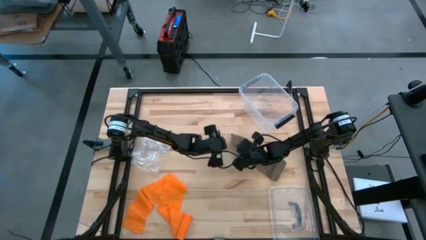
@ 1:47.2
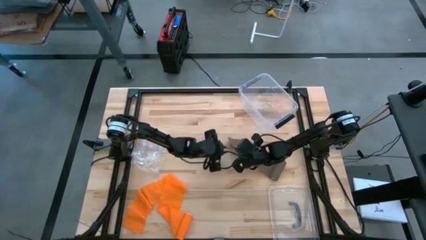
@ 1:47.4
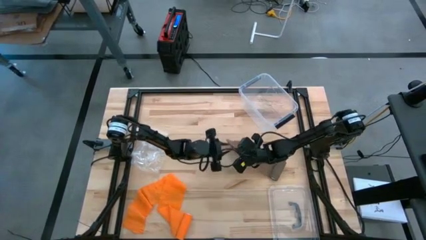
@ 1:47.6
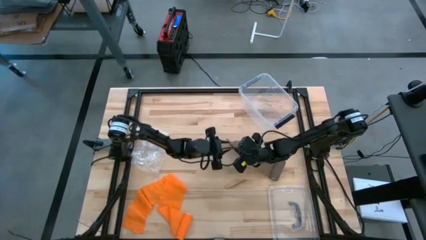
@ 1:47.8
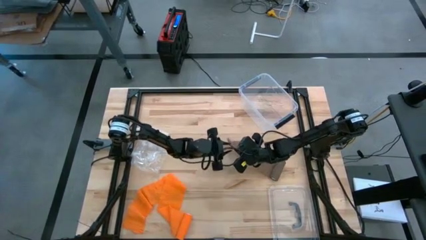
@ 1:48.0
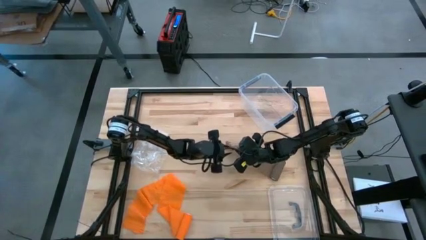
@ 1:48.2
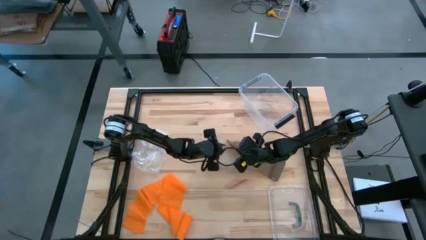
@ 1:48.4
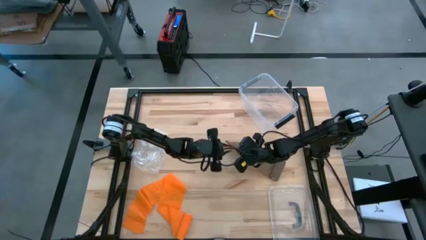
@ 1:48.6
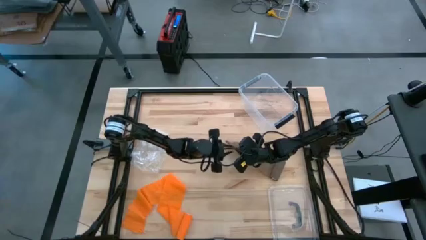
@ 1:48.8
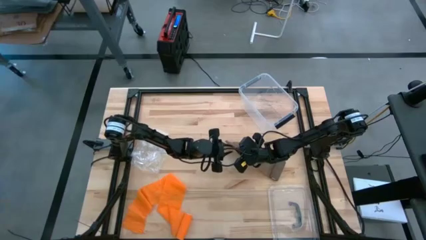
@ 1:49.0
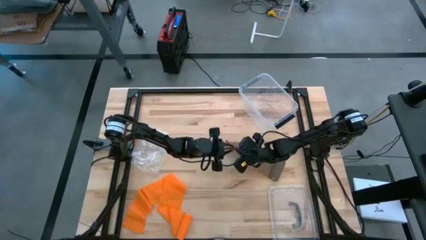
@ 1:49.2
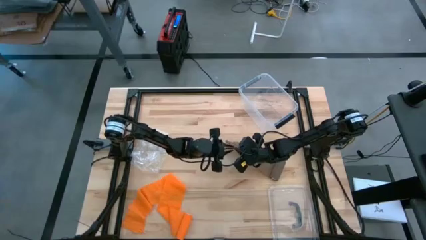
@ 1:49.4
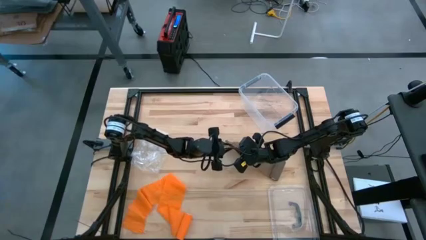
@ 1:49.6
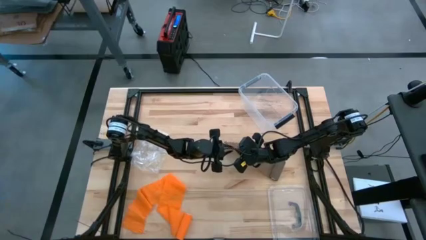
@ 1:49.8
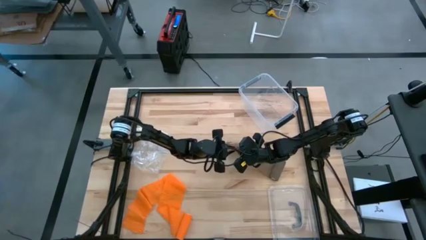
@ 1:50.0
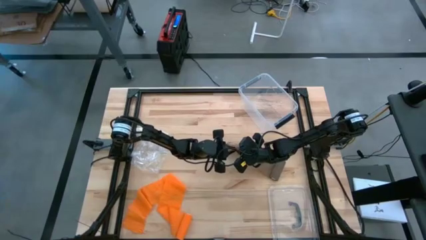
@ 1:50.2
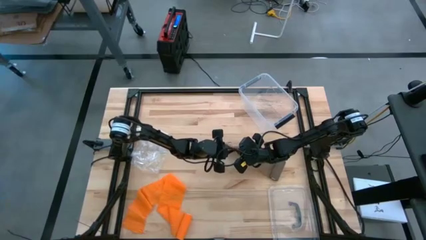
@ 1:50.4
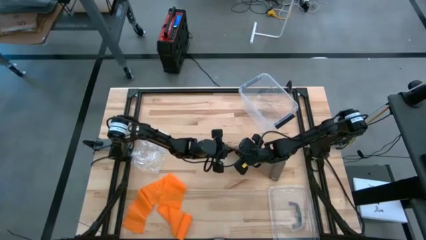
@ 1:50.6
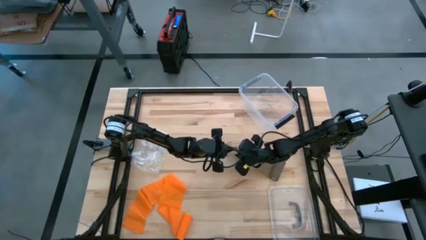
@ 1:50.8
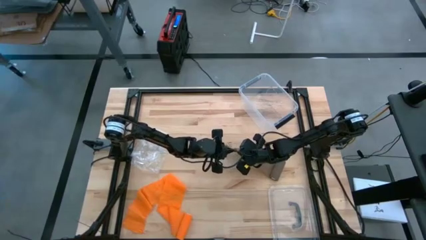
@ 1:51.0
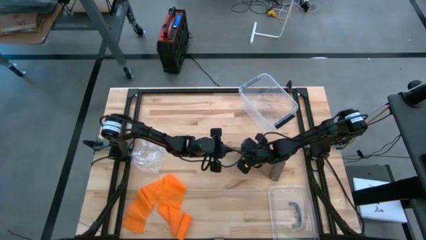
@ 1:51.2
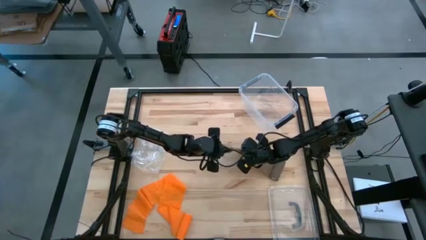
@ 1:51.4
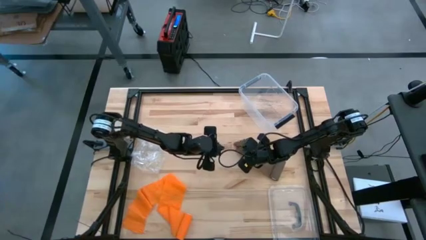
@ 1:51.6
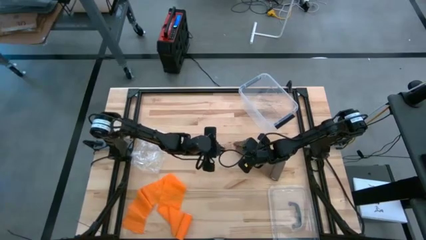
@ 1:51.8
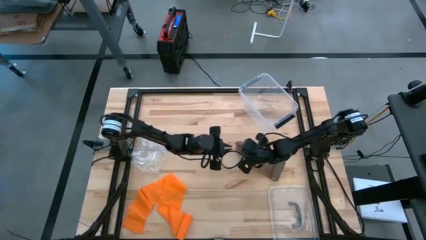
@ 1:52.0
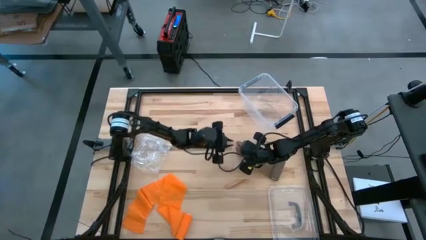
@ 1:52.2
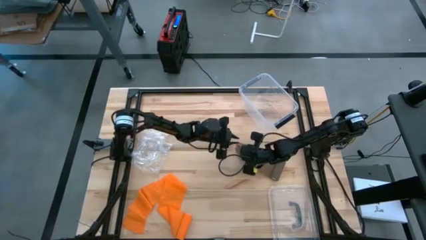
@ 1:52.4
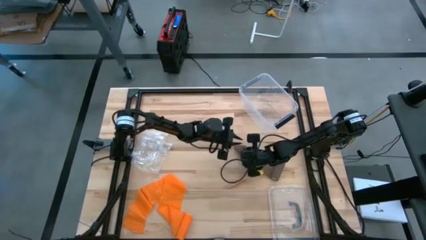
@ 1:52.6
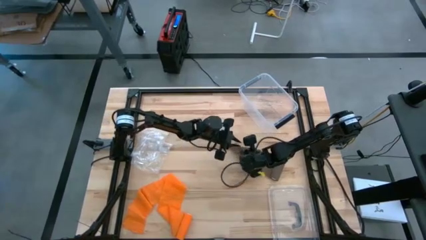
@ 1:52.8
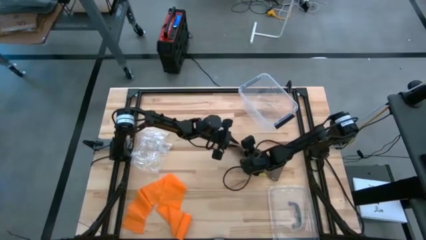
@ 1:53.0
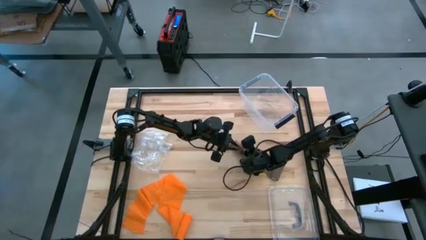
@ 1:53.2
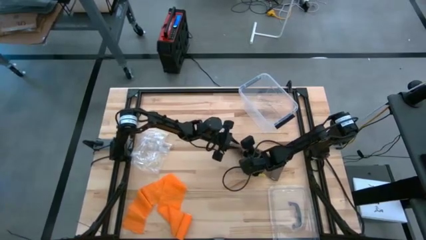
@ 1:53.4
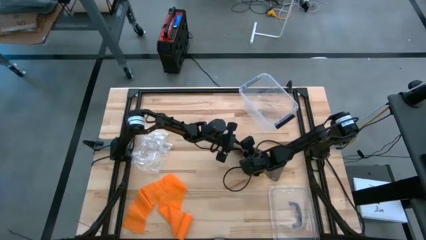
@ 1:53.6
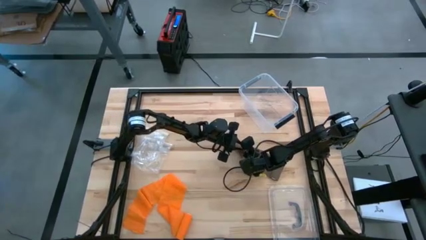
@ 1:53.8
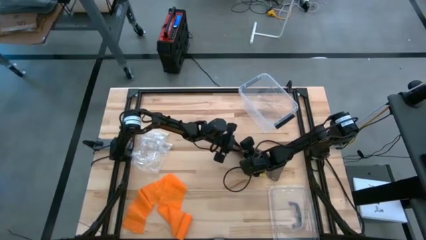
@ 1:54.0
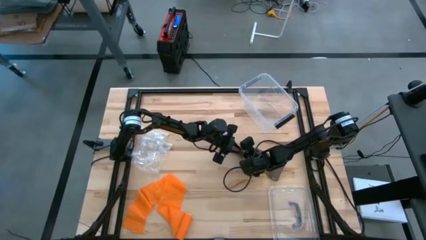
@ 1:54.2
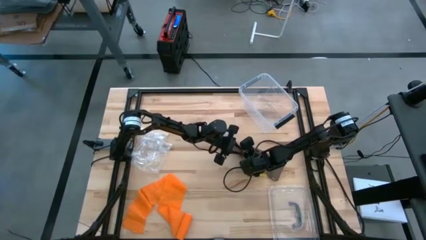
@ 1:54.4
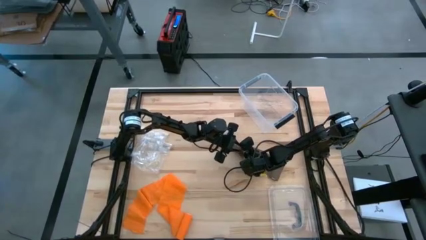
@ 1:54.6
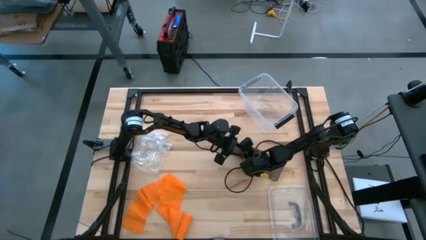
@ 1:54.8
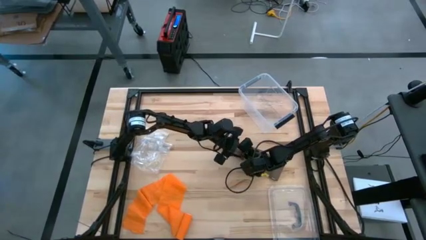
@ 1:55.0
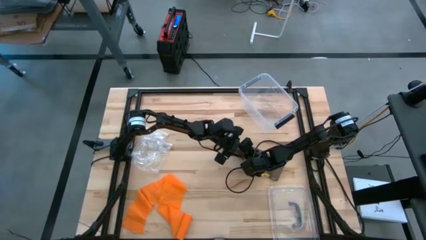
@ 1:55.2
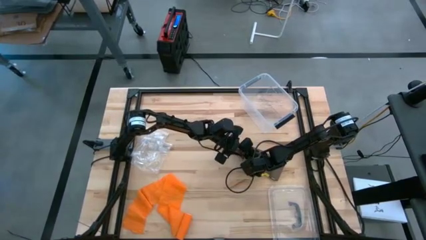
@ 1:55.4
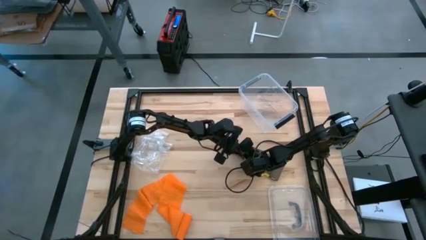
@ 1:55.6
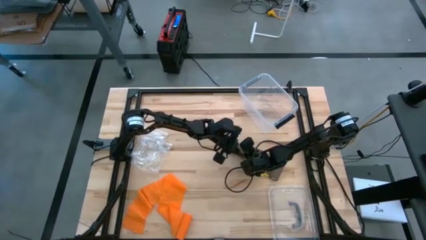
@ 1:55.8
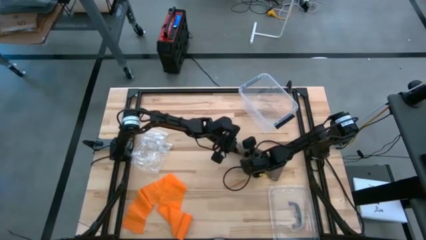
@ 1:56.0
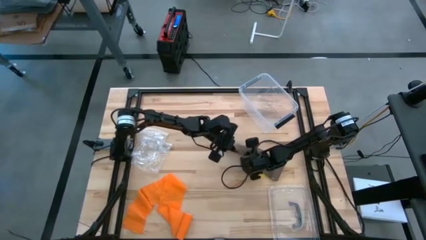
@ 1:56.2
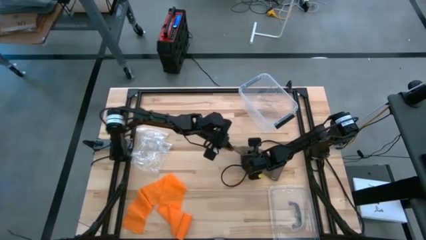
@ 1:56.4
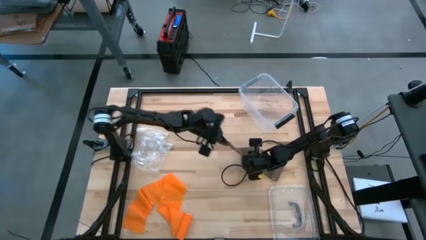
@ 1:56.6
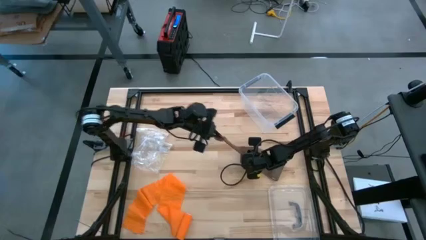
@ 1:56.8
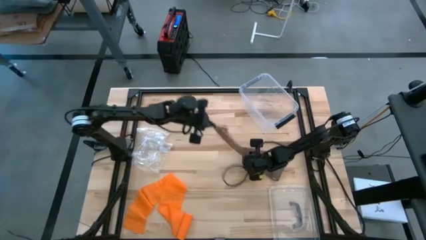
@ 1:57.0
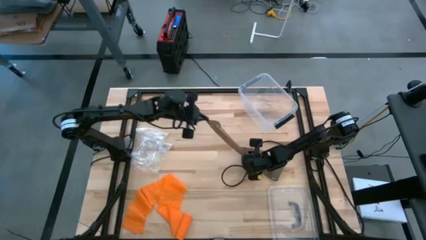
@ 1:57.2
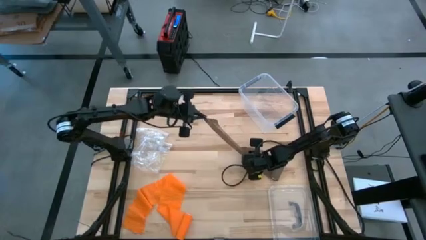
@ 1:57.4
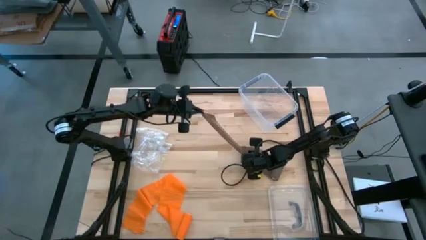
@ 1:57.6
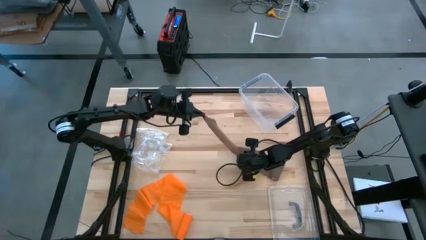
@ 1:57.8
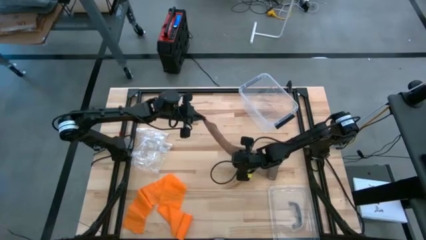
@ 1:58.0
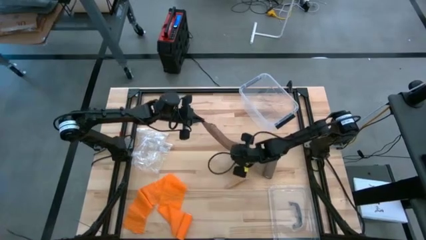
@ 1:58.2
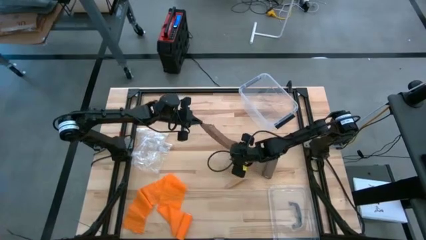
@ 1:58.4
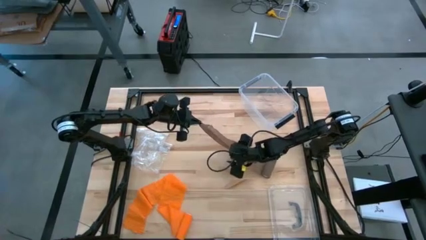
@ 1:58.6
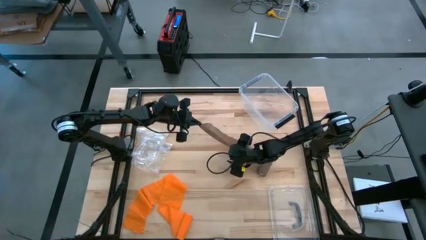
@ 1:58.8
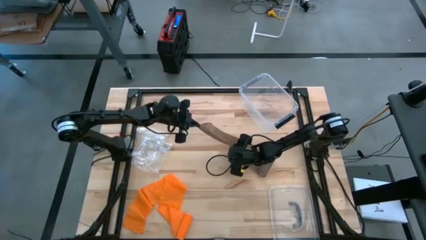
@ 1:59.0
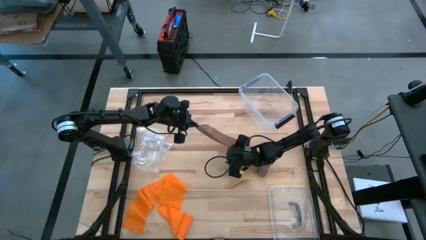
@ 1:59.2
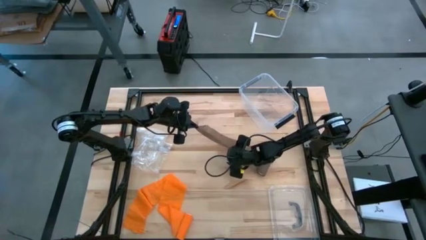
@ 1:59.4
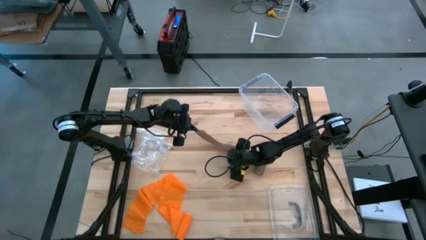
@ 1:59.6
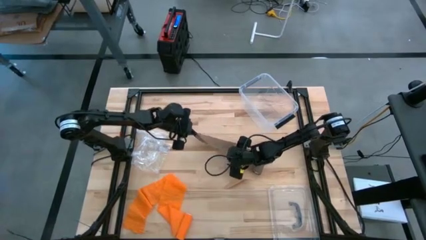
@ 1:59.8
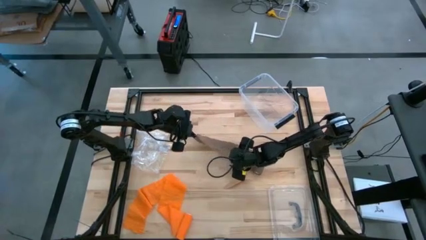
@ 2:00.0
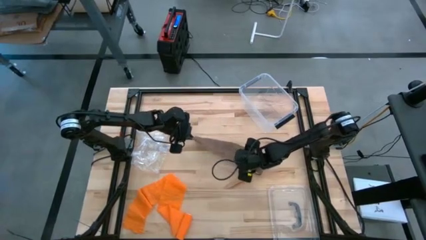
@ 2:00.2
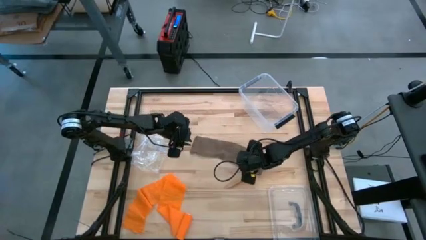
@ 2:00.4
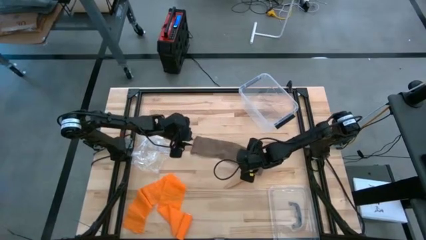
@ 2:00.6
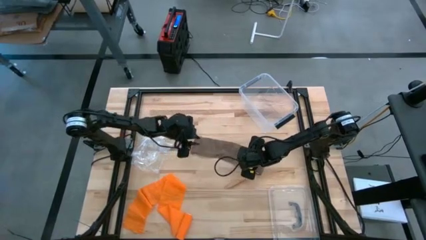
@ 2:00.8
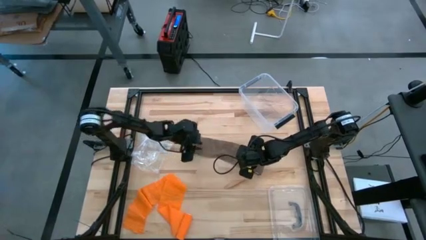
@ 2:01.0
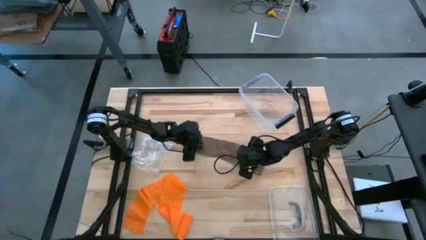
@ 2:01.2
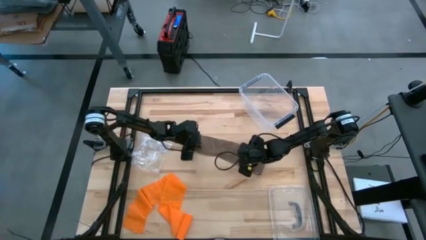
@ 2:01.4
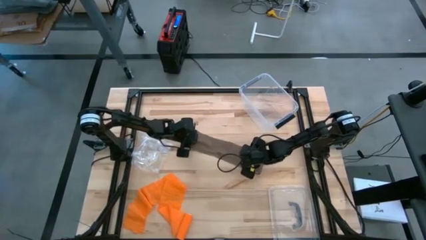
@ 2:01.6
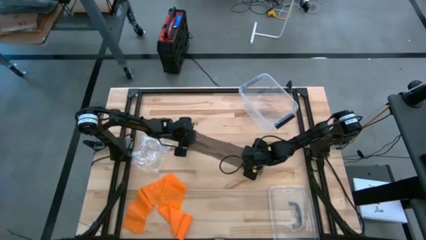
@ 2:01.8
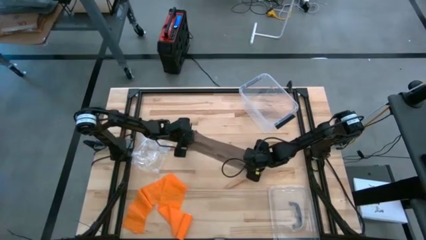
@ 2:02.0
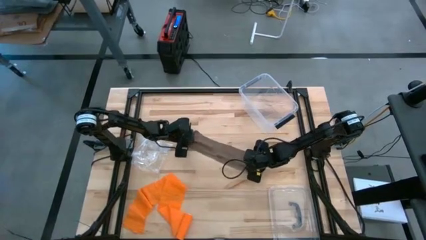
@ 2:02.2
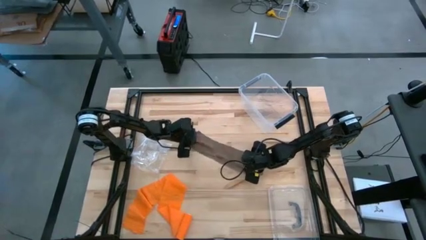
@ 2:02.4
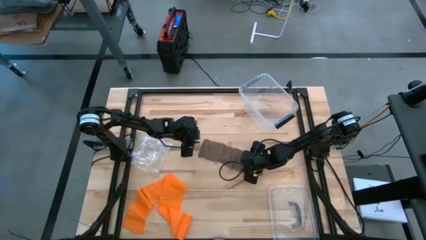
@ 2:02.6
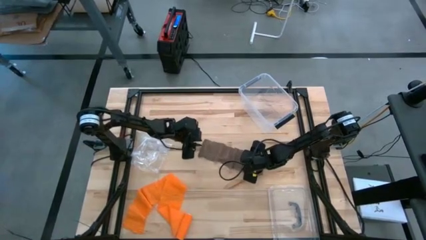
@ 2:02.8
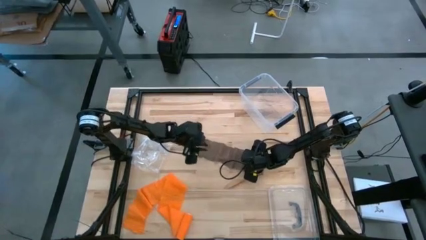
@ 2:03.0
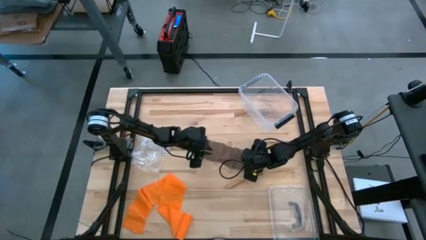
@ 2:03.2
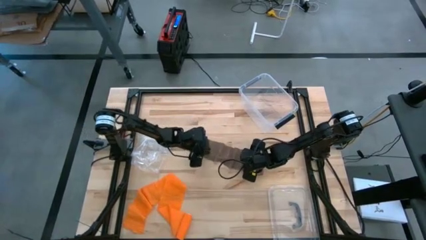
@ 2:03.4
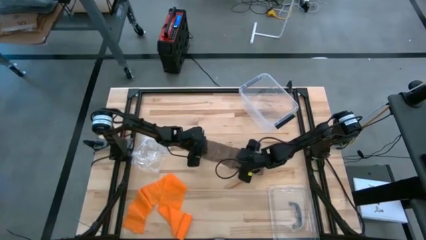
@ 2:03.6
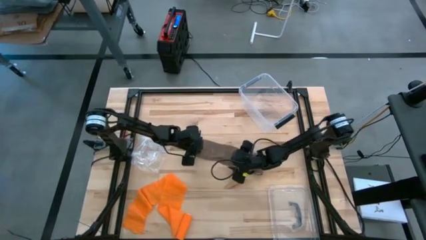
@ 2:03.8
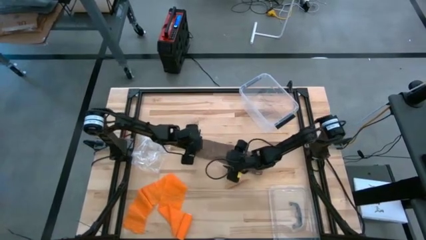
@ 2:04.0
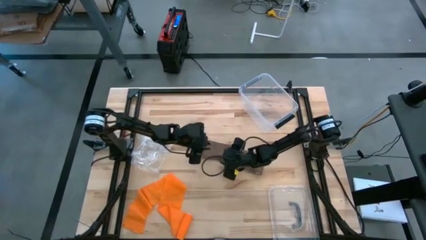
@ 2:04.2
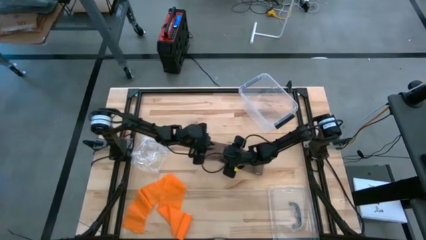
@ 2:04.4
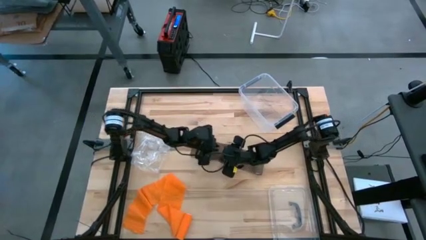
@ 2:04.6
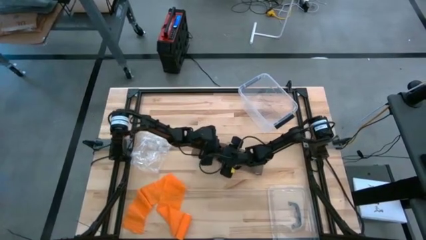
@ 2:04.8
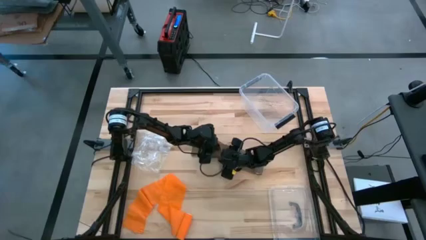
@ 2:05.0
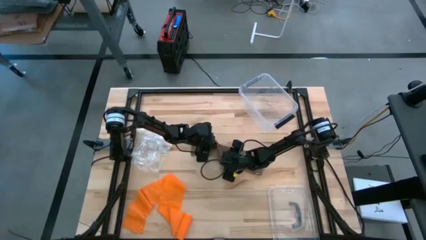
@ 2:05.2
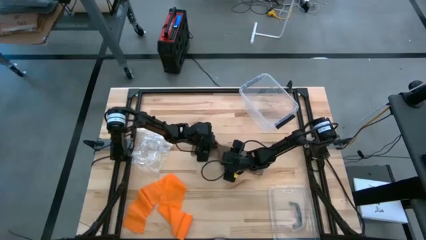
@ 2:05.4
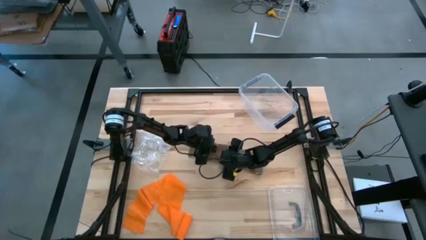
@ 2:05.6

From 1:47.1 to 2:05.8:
Task: Roll bandage
Uncoil the brown bandage
